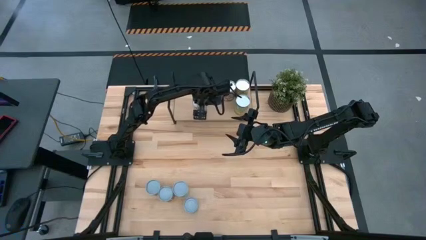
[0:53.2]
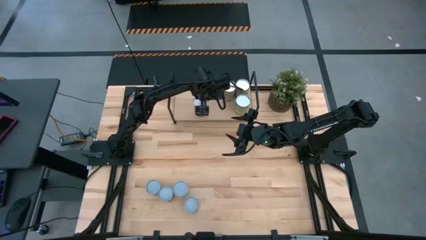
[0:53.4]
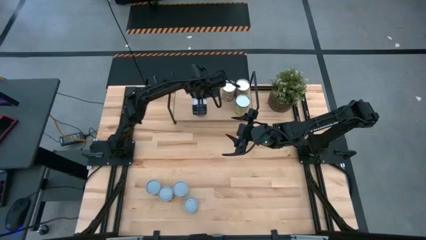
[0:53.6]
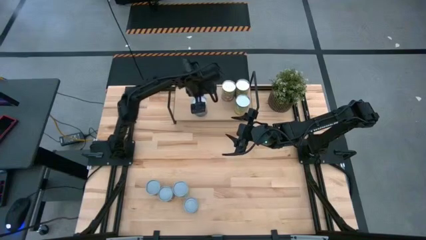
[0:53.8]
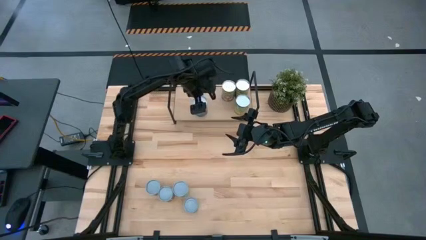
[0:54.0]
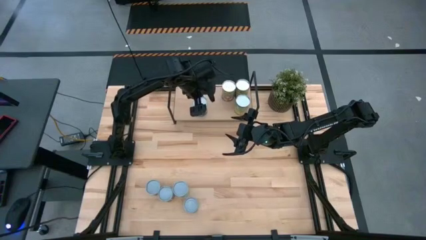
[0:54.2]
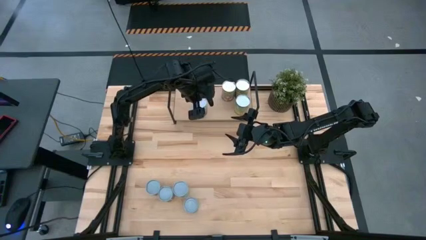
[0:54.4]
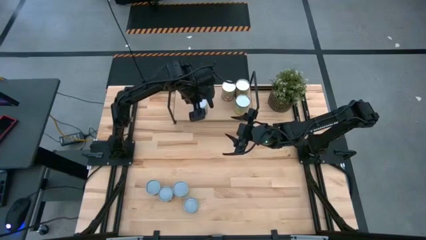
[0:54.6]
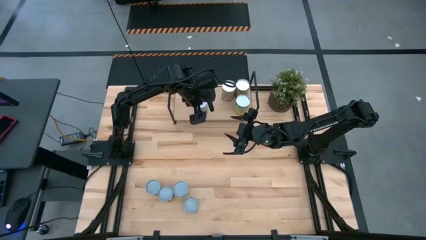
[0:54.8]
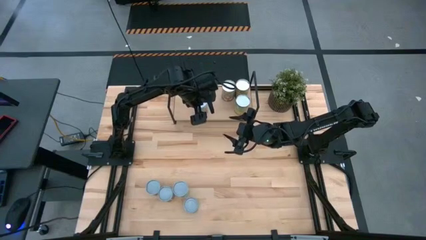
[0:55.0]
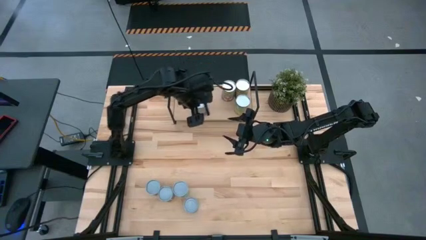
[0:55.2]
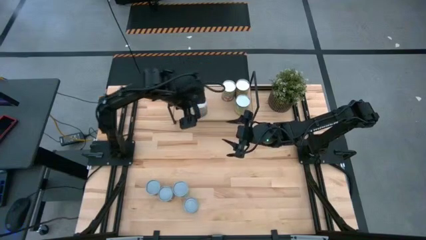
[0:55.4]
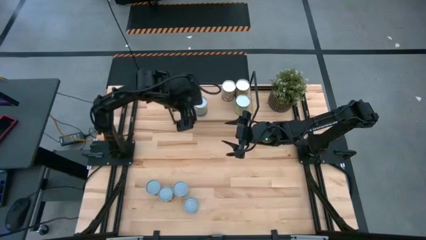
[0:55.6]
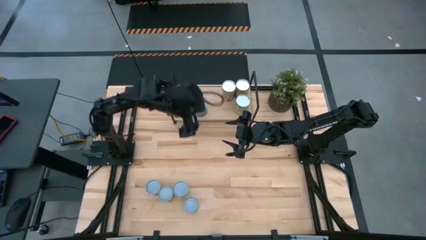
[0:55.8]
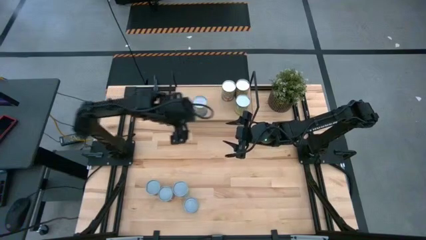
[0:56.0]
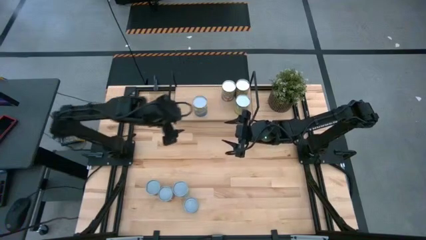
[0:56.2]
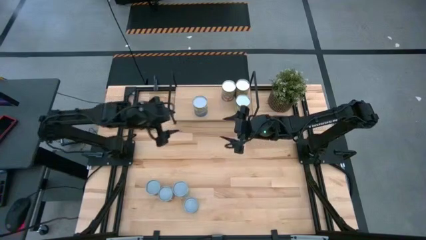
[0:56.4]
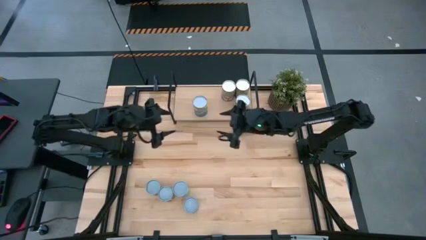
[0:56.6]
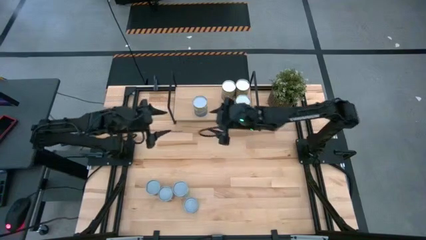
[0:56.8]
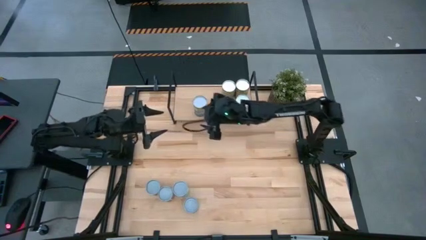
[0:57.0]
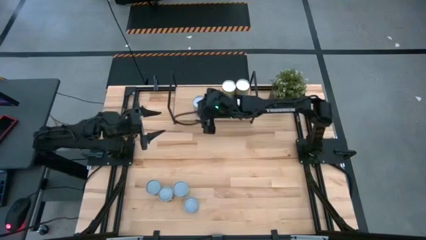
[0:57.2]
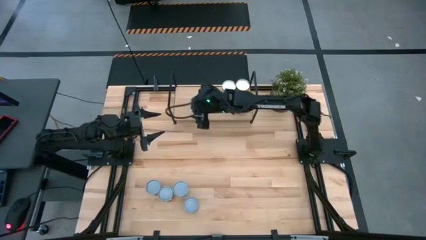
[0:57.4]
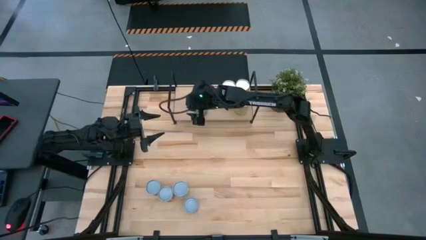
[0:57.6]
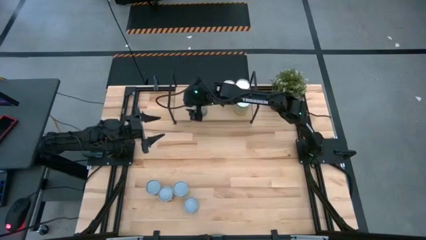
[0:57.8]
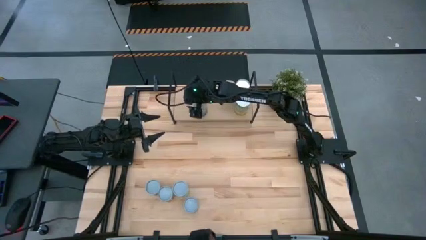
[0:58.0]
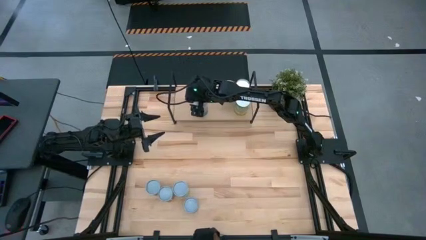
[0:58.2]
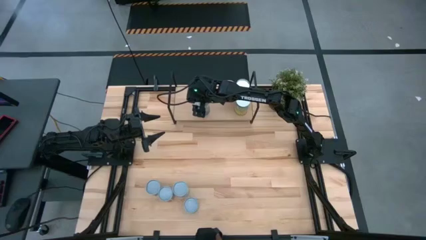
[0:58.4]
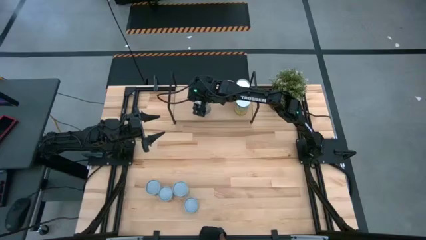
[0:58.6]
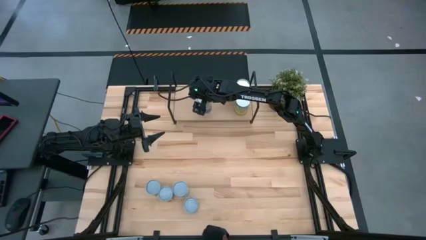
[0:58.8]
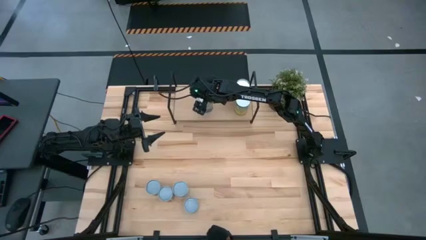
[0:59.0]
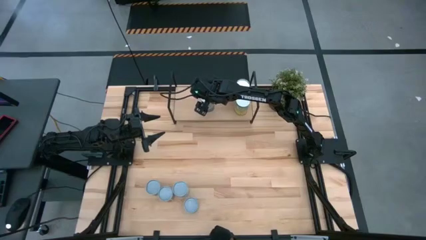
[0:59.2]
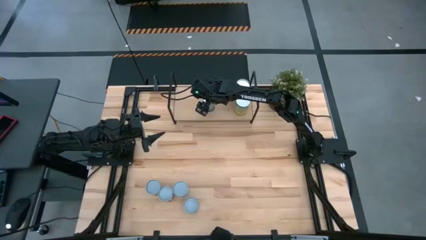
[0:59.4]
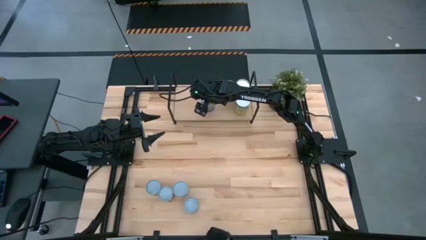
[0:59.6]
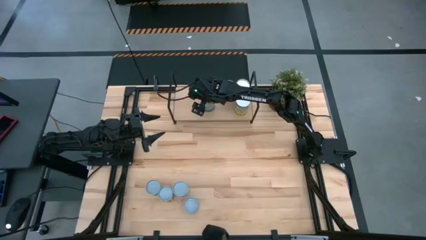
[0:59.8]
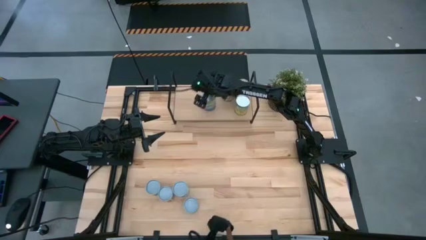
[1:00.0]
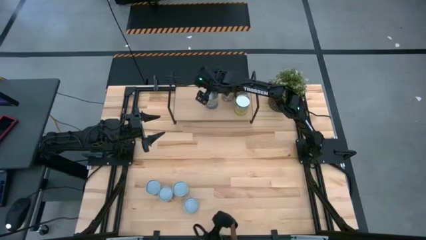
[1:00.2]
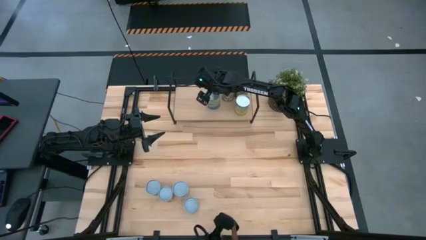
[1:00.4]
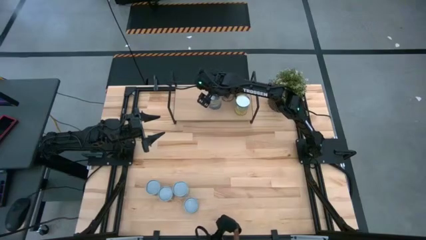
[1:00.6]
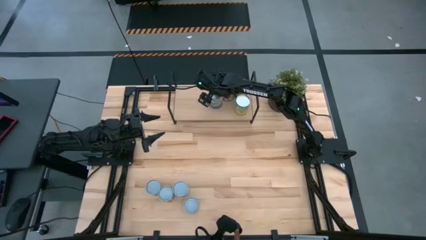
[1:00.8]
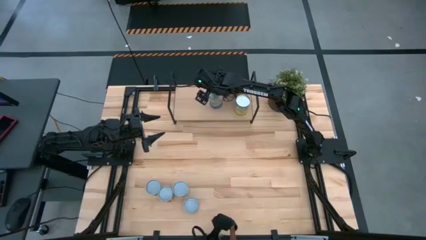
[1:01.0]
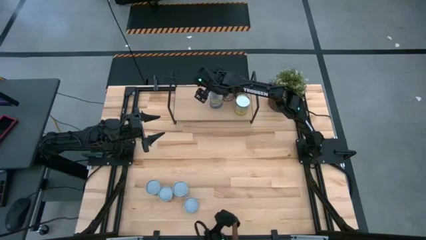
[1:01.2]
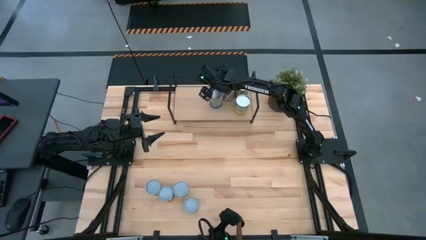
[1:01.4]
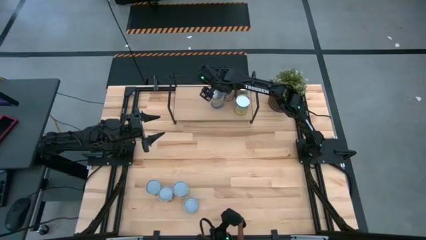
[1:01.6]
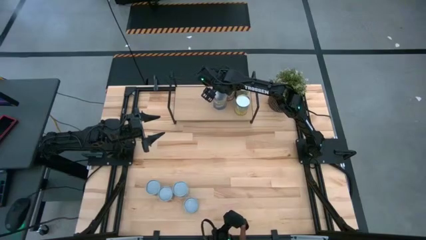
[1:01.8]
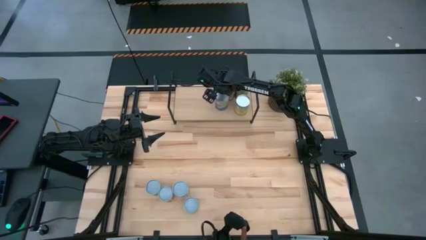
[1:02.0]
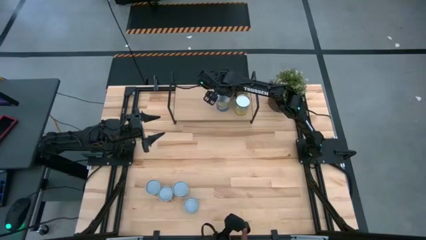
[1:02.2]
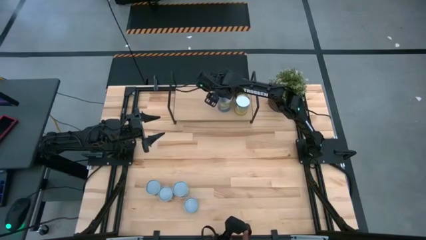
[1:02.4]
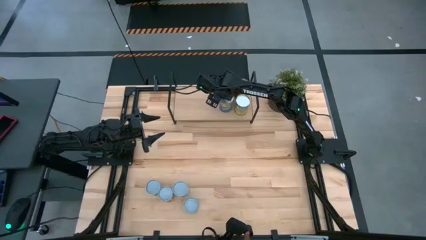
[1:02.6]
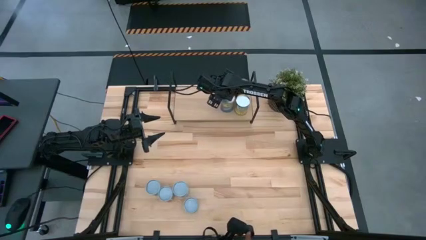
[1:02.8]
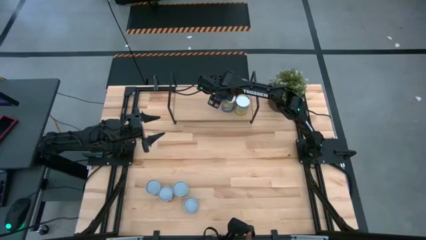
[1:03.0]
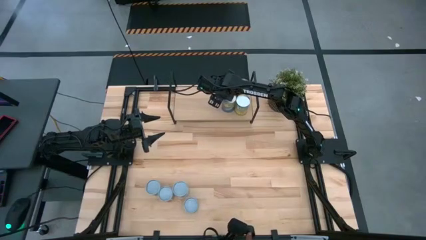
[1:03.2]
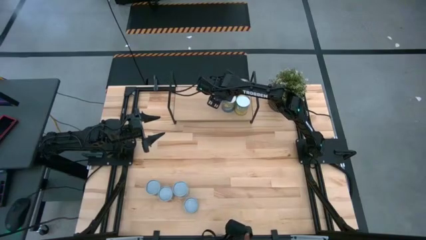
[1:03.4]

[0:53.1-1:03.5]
Task: Pick and place cans onto a shelf
Put the canned peas on the shelf
